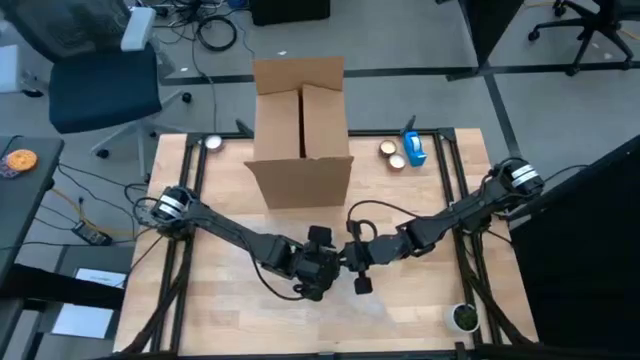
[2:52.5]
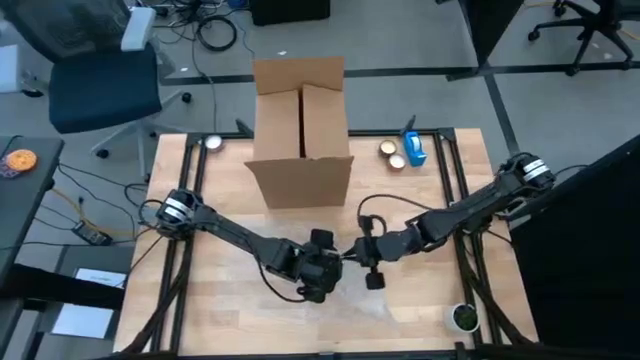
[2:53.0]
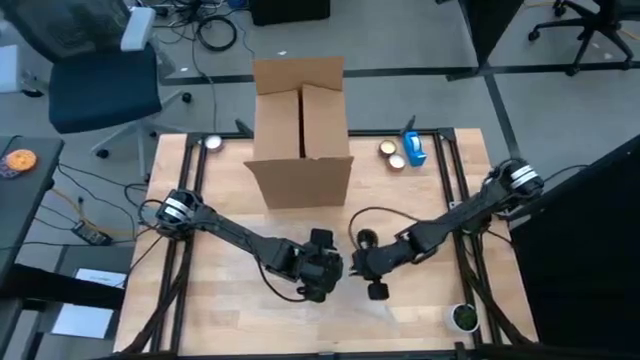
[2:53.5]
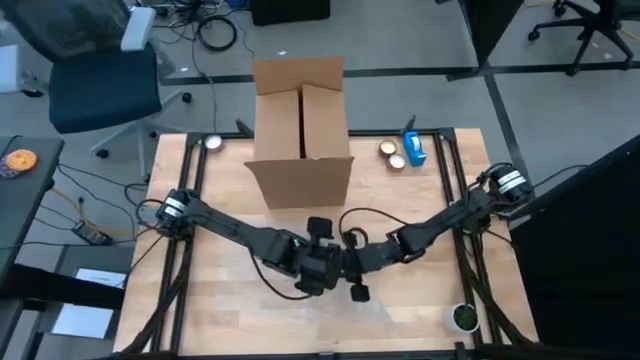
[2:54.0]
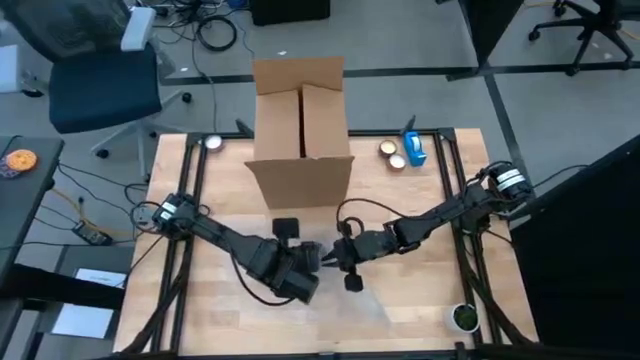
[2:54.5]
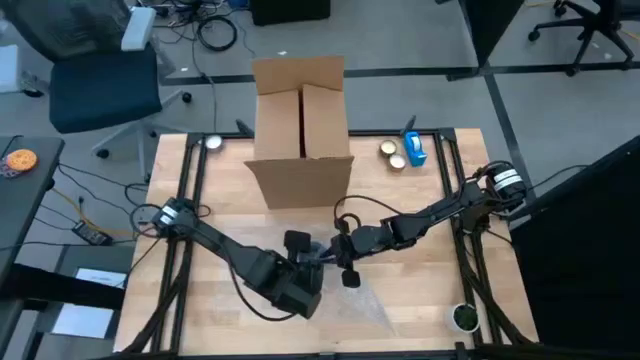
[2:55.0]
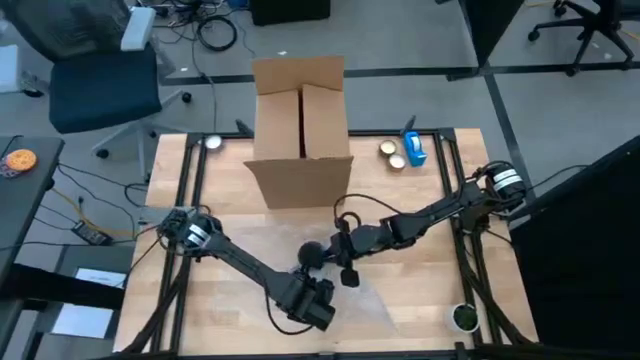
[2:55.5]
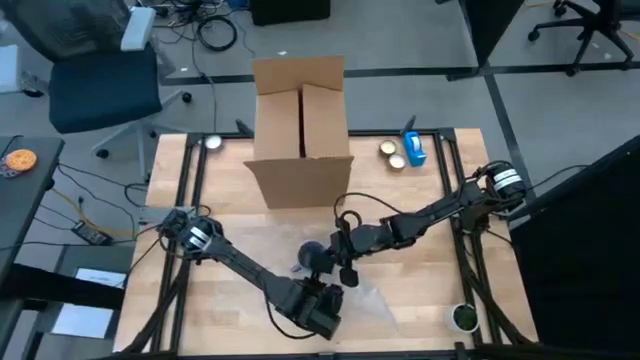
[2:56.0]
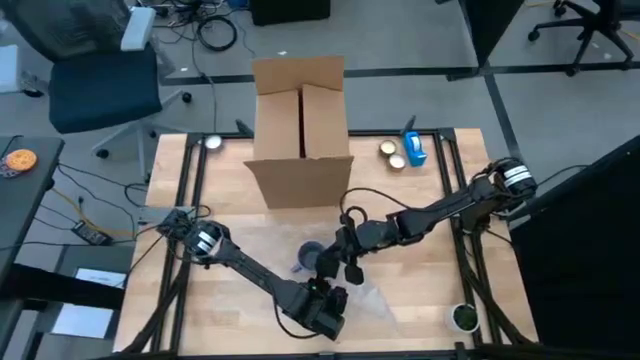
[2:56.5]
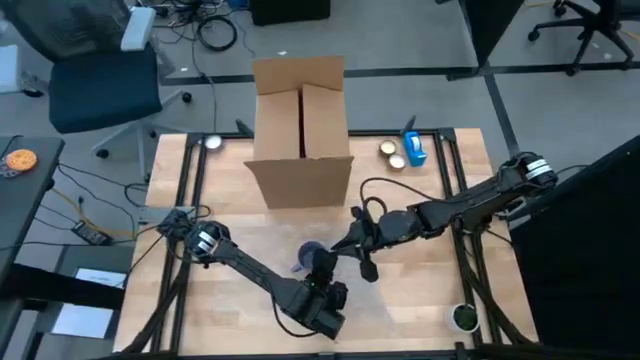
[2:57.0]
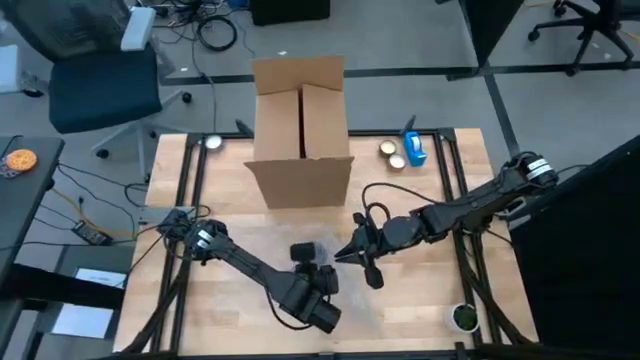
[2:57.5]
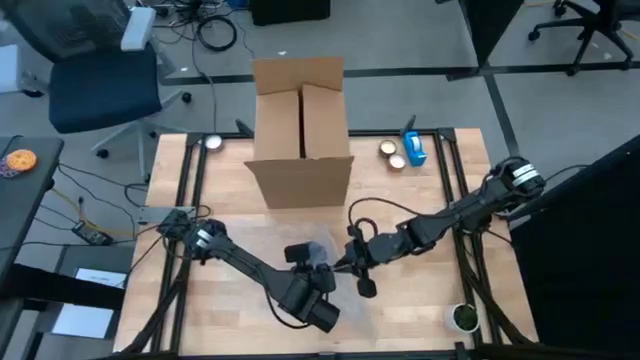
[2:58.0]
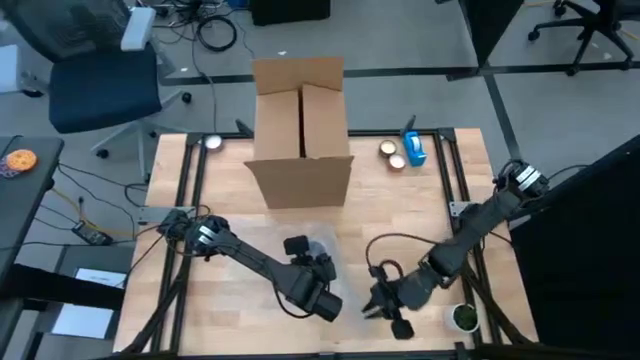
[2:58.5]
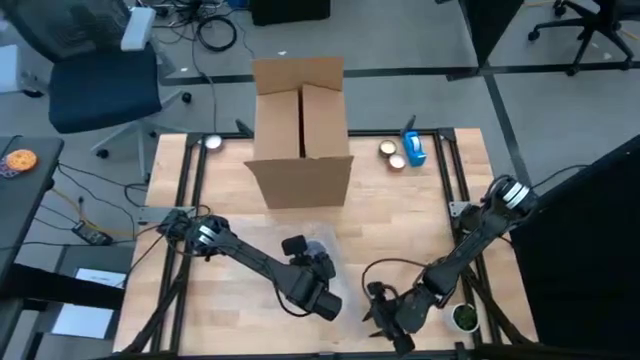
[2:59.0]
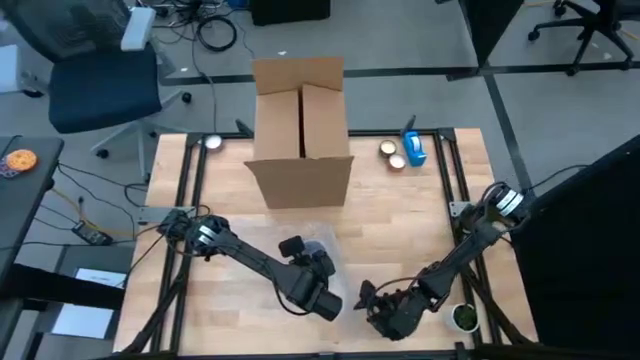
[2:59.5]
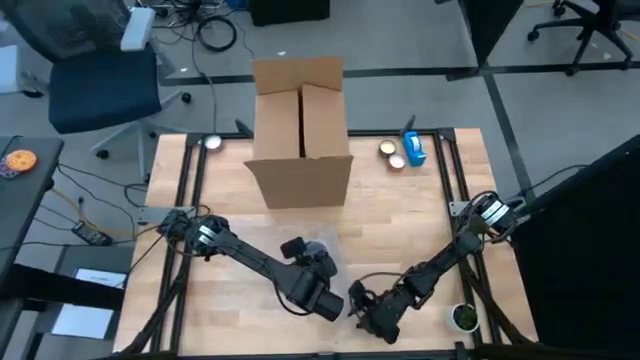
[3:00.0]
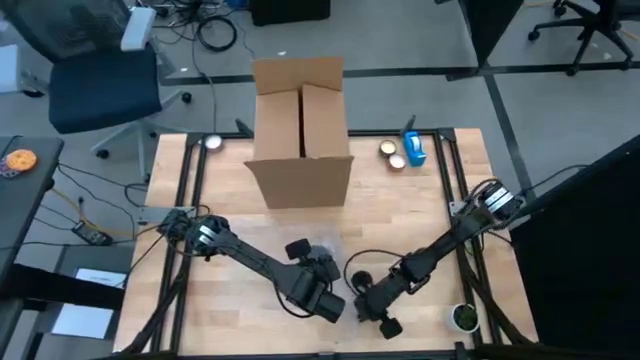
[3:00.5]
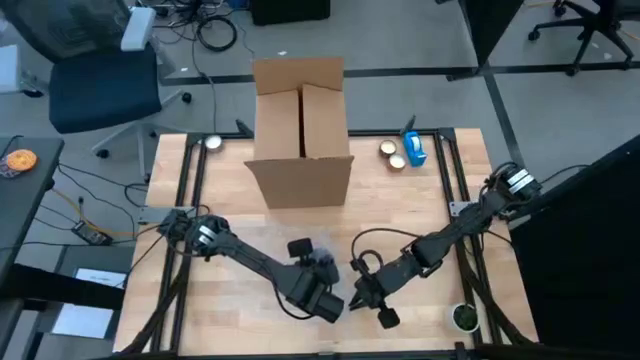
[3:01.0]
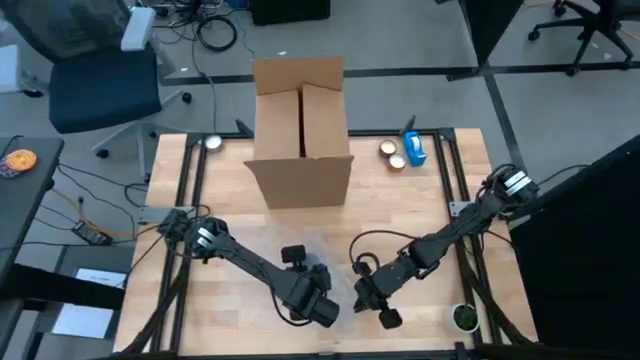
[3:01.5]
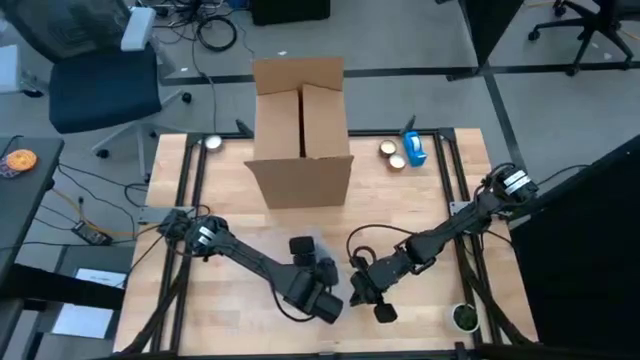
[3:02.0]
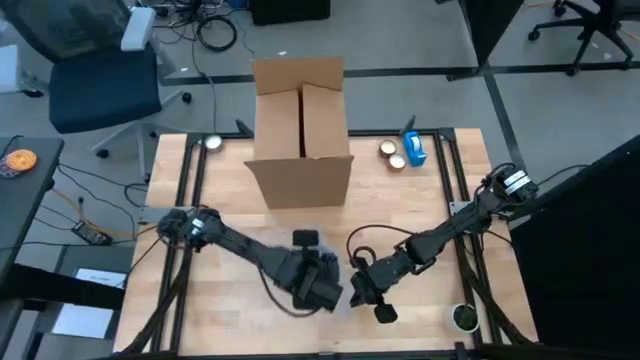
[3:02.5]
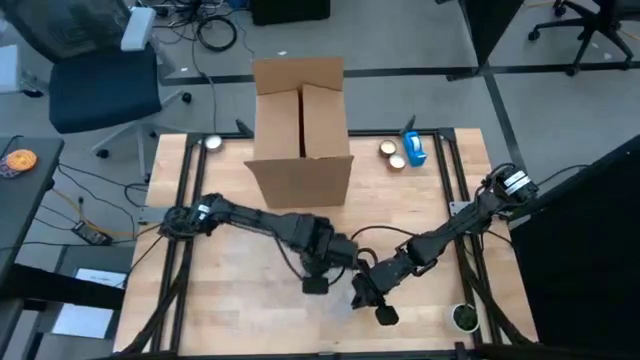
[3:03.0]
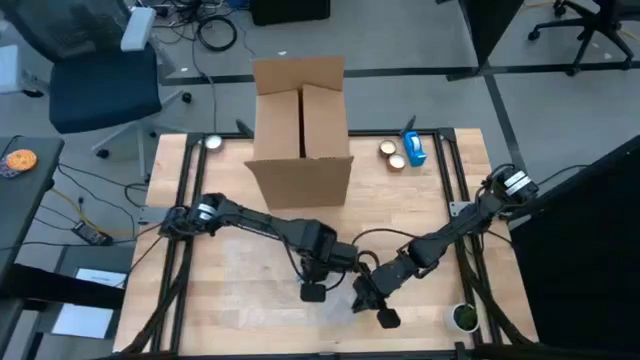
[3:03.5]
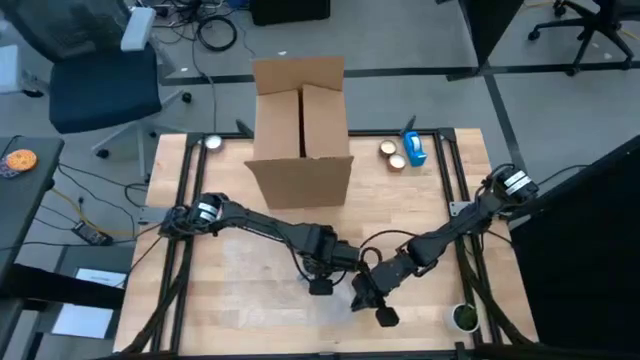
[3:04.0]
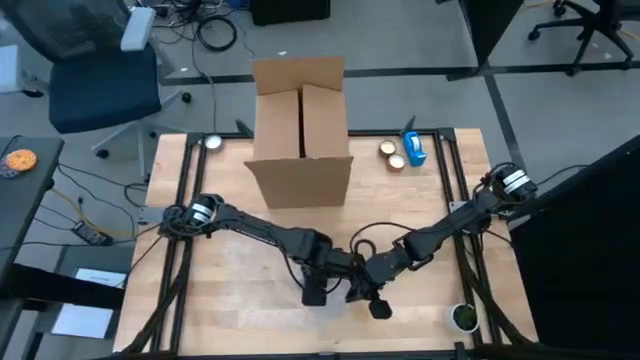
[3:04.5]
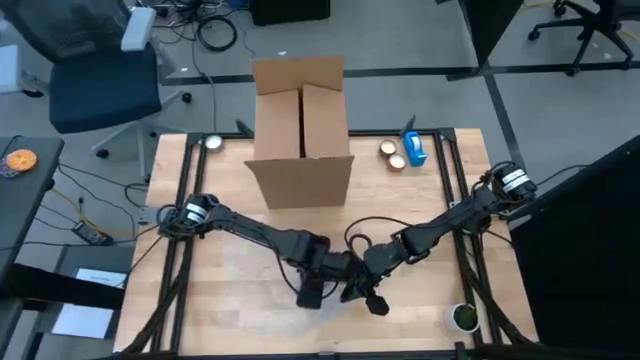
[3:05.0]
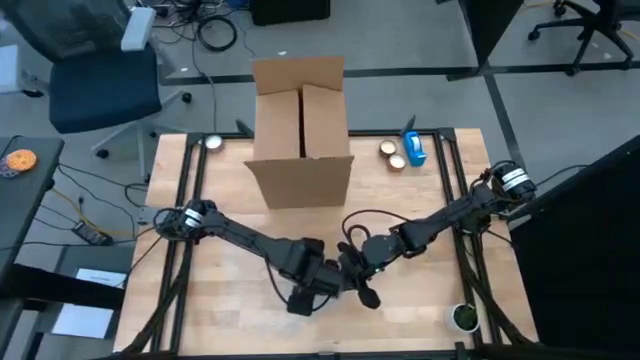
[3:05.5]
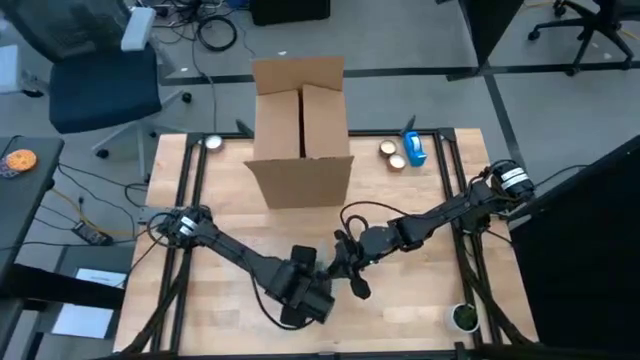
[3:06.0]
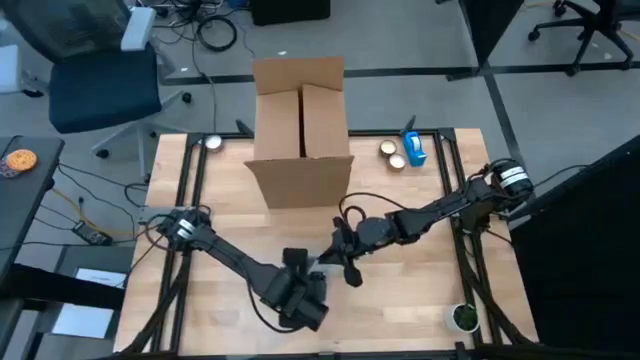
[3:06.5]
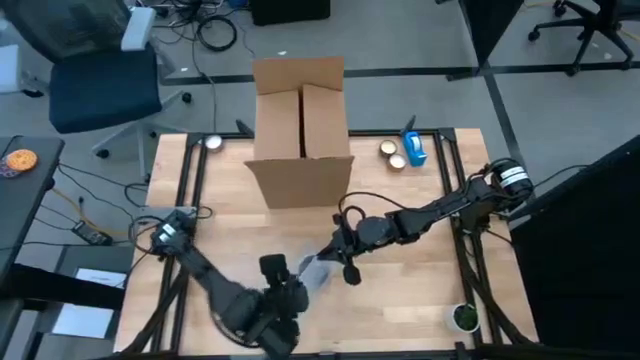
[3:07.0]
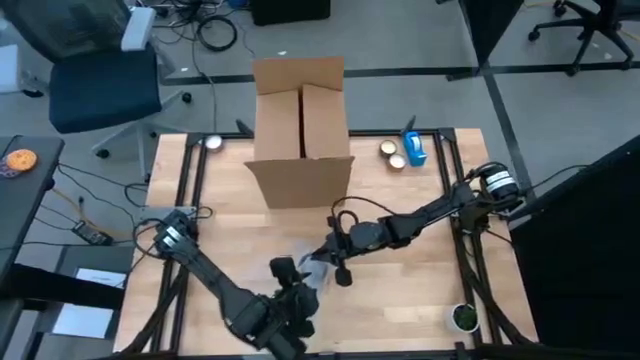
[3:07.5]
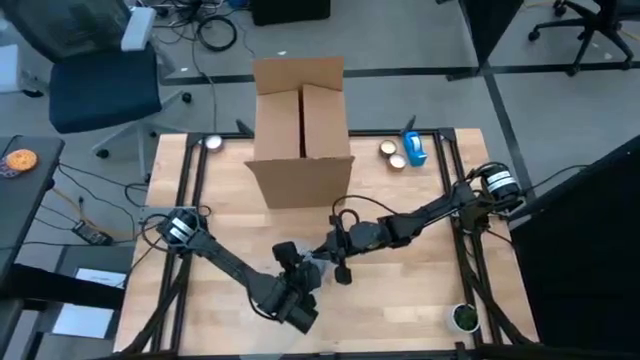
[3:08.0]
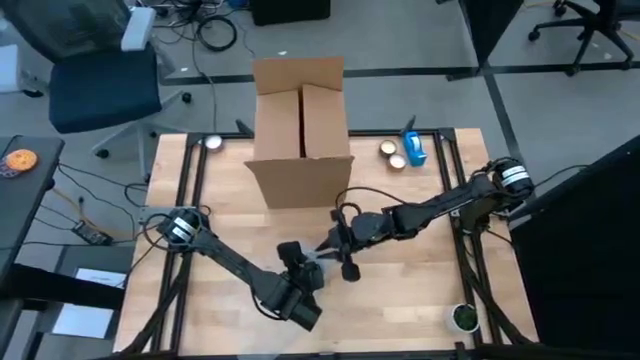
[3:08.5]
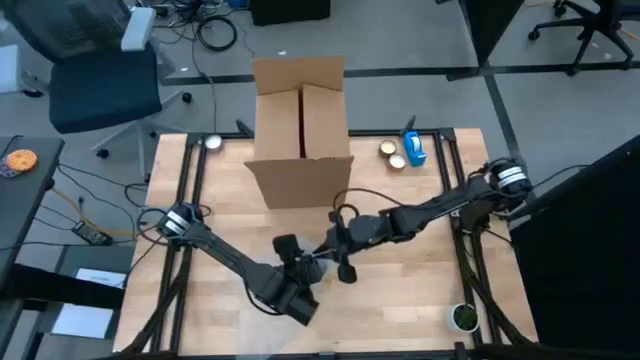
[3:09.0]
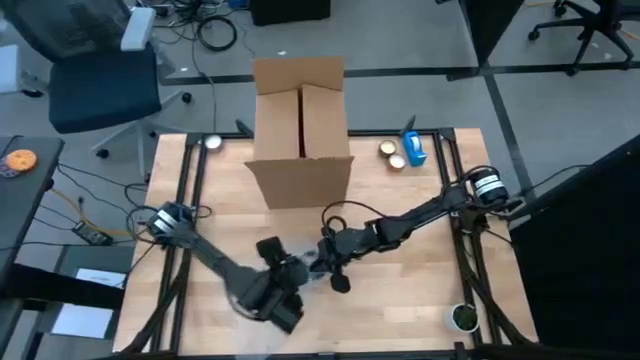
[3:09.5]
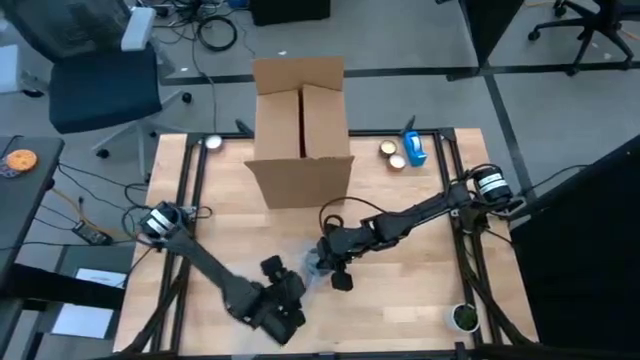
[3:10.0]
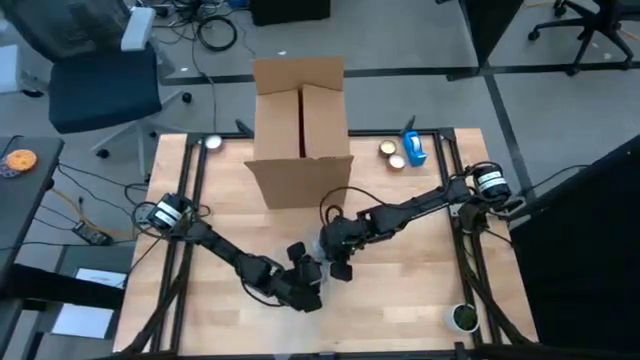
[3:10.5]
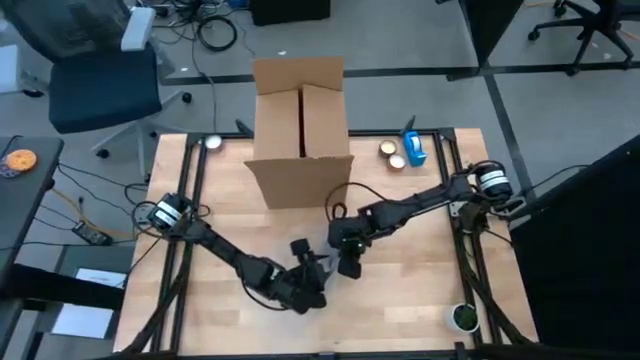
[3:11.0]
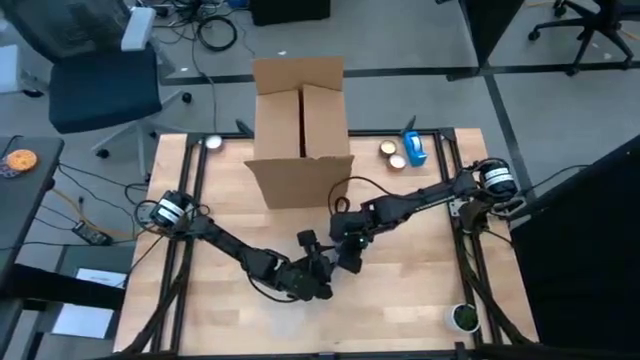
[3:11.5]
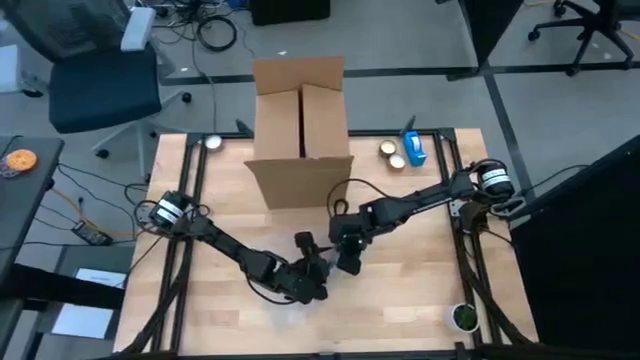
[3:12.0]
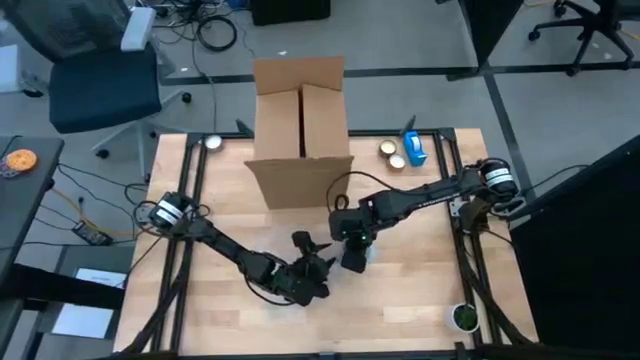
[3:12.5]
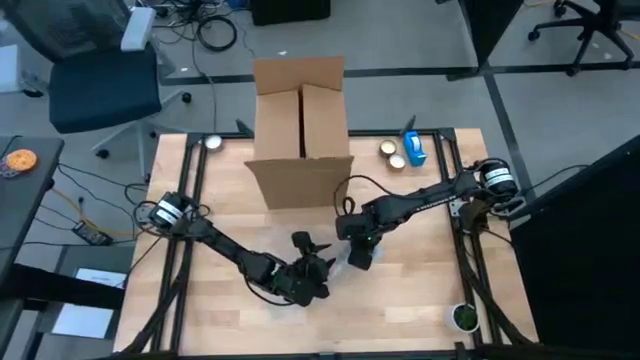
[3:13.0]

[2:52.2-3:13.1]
Task: wrap mug
Wrap the blue mug with bubble wrap

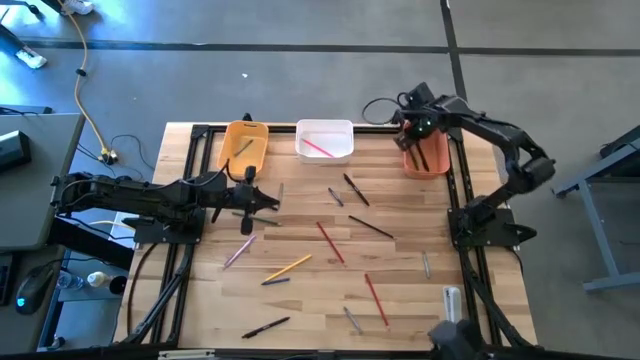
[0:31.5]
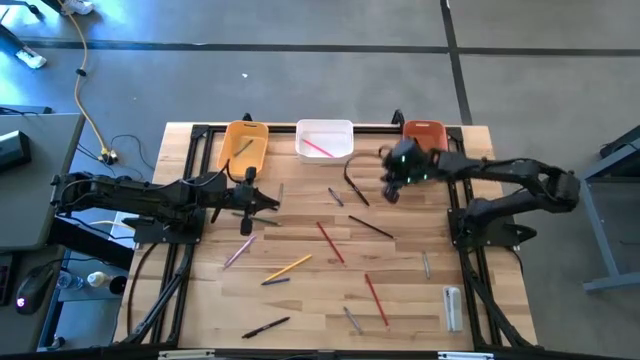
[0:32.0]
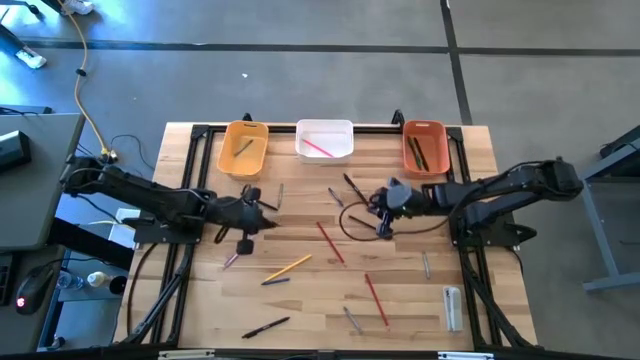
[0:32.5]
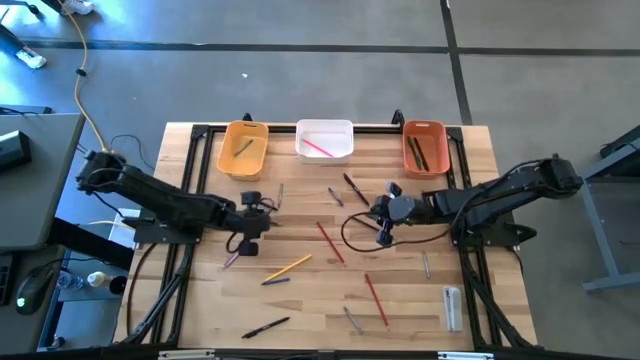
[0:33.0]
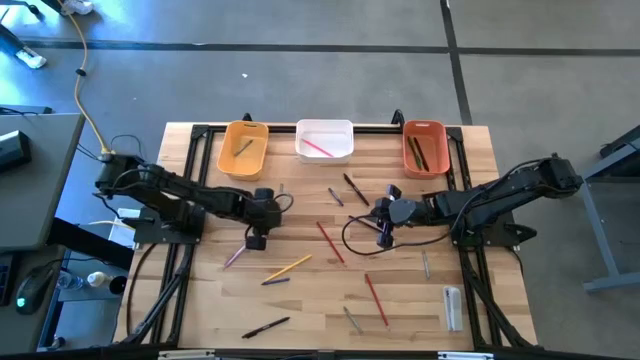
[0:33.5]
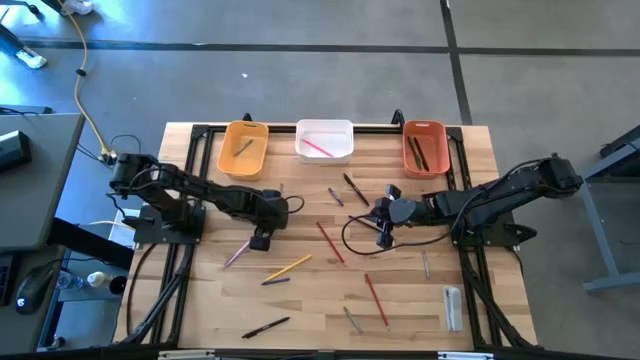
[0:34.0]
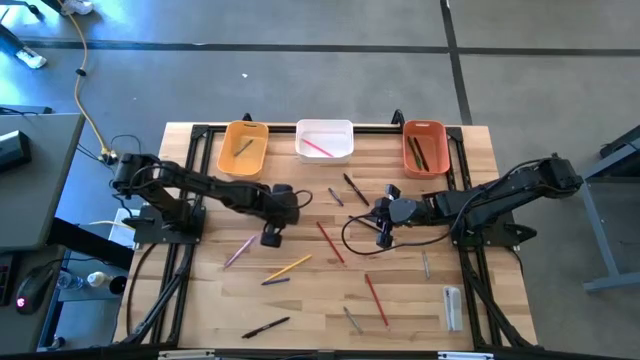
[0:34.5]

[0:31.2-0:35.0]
Task: Sort crayons/erasers/pens/pencils in bins
Put the green color pencil into the white bin
